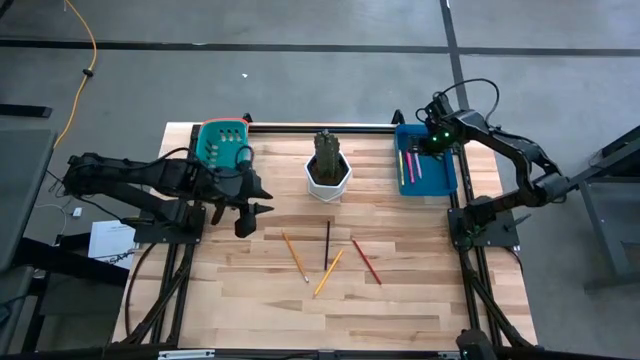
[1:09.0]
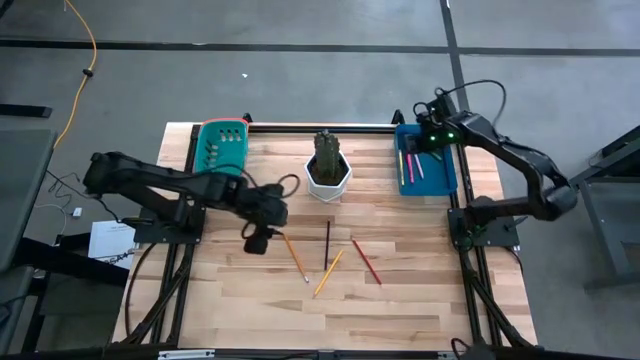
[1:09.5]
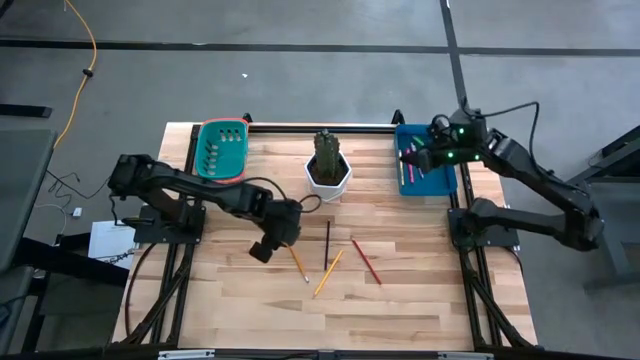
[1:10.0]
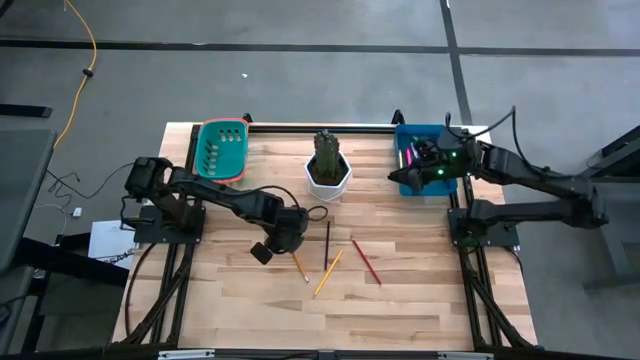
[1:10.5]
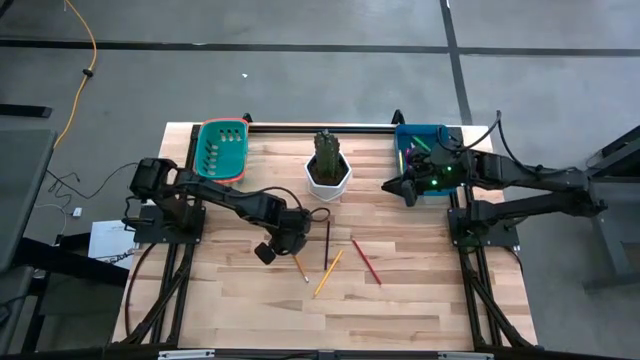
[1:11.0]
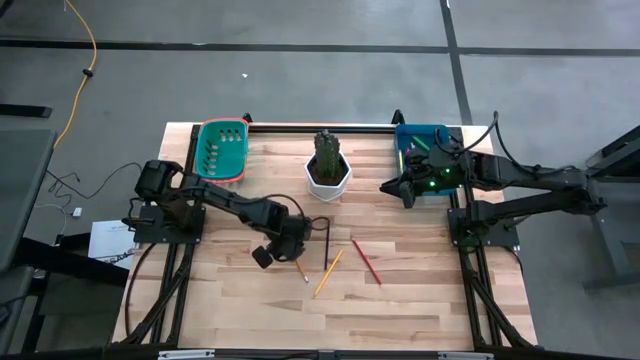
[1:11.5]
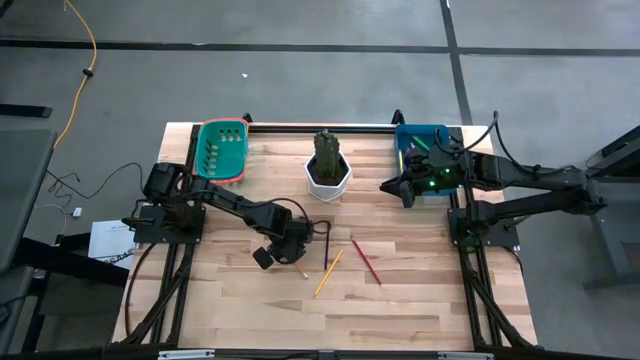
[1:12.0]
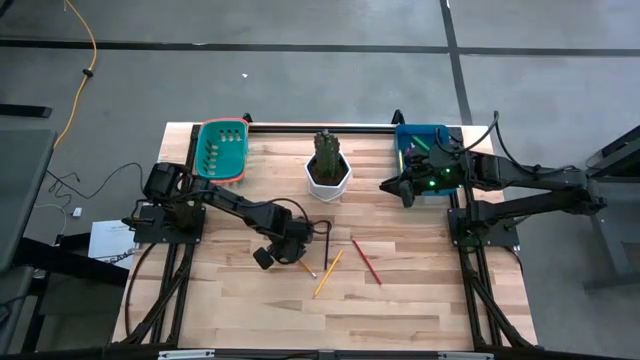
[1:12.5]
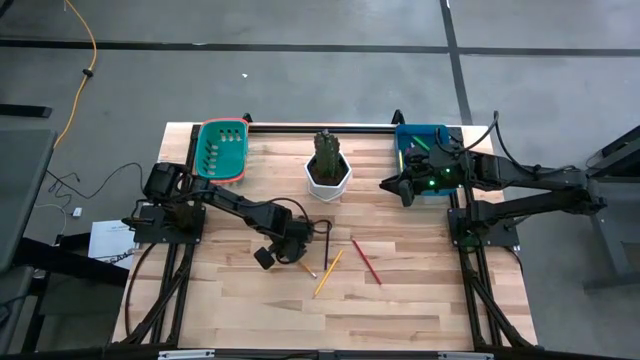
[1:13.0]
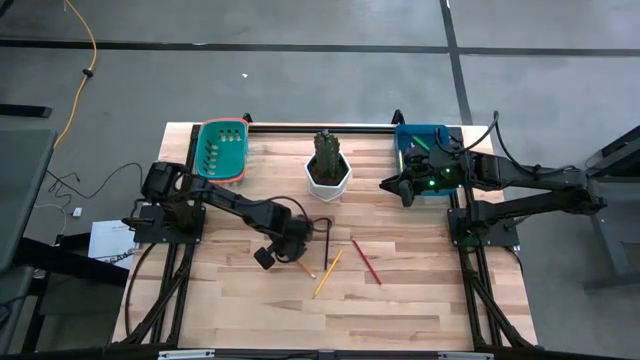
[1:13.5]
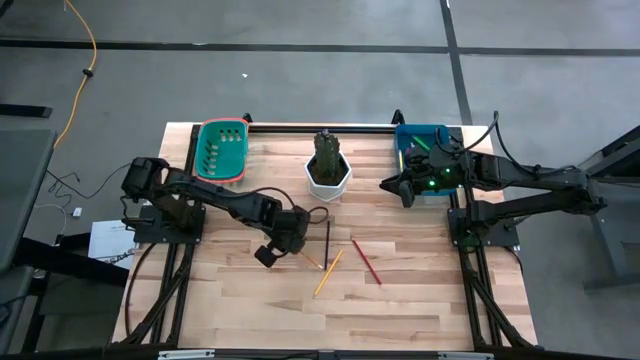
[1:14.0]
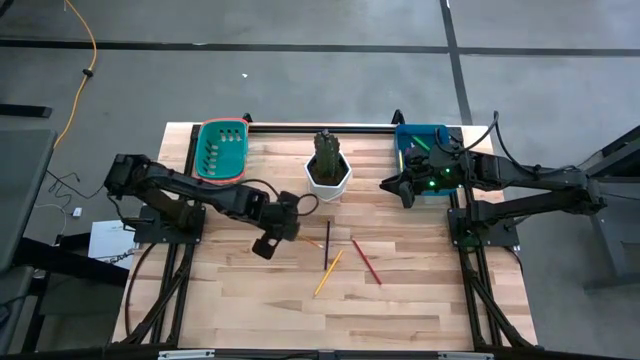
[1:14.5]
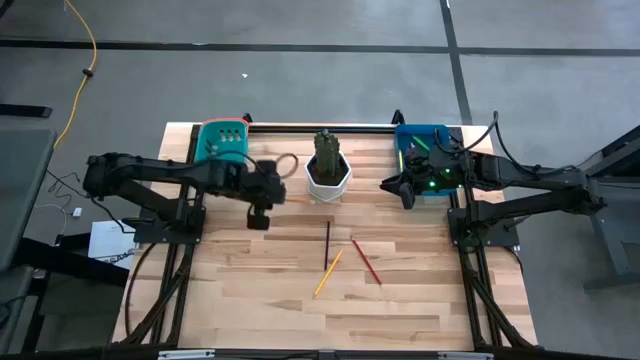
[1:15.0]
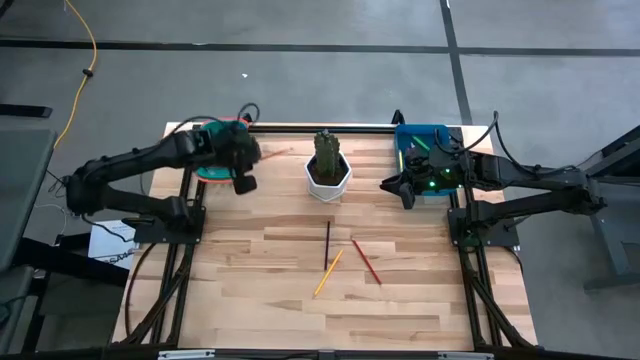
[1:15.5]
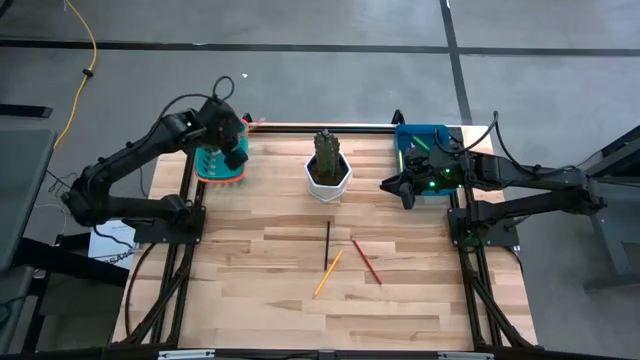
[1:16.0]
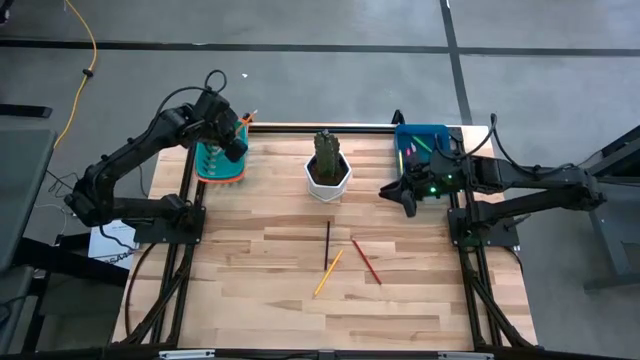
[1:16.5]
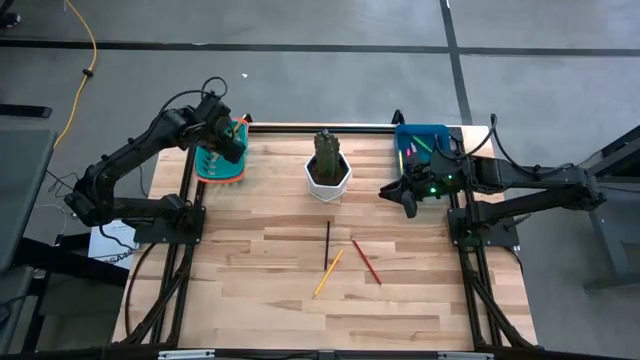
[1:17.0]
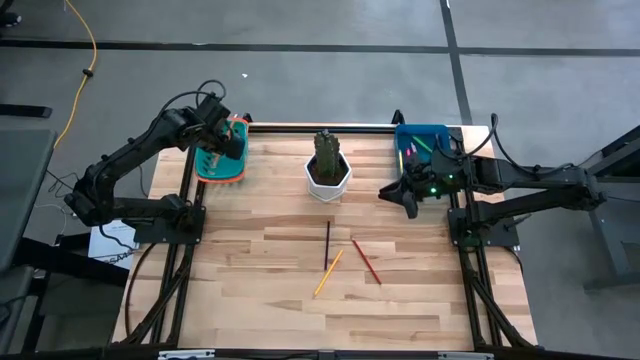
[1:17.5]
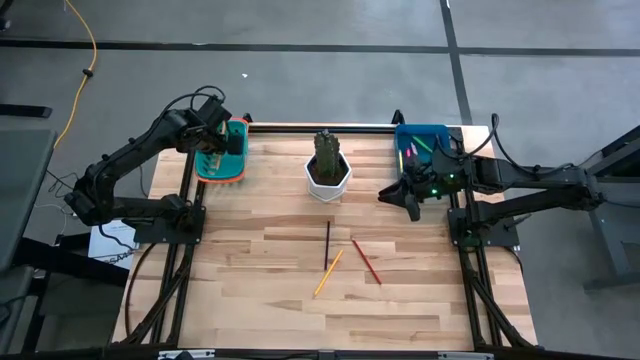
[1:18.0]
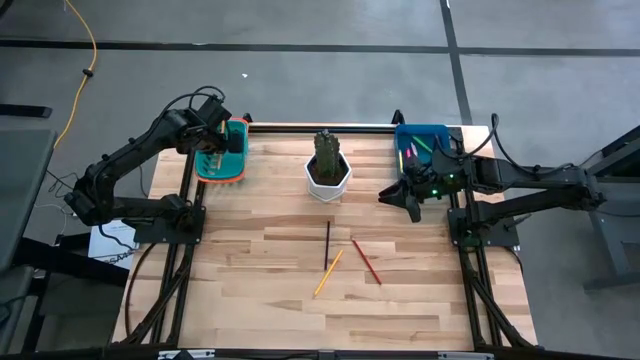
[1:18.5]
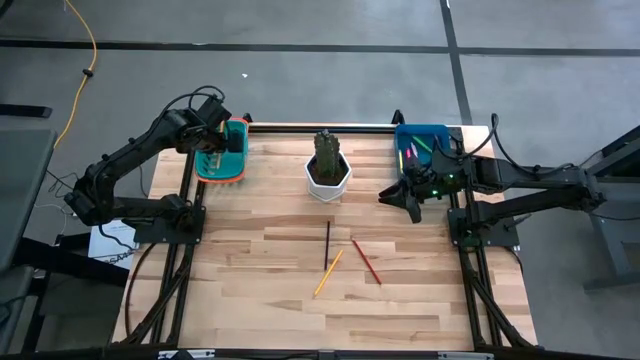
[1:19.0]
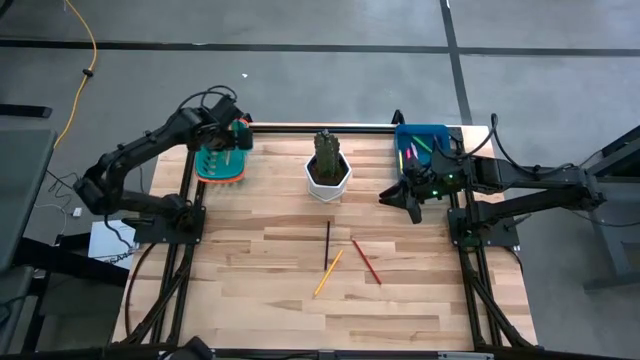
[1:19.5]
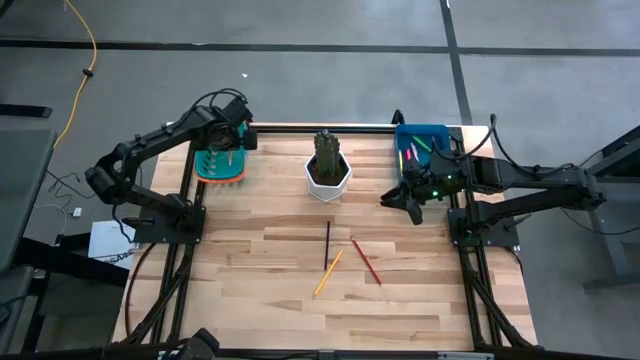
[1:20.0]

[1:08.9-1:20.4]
Task: Sort pens & pencils
Put the orange pencil into the green bin
